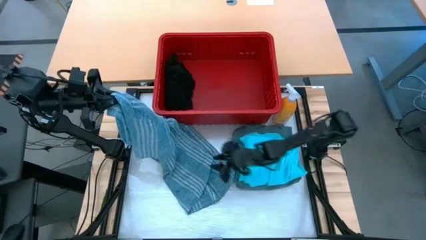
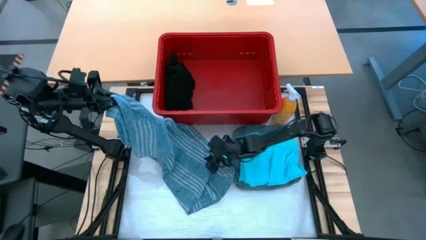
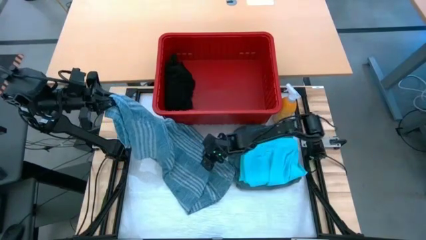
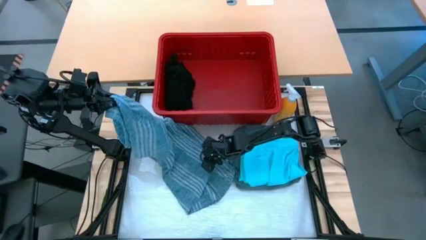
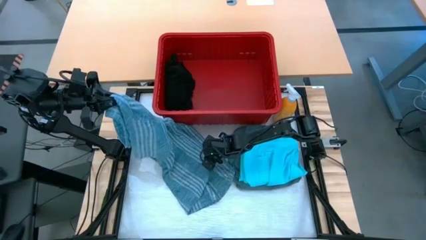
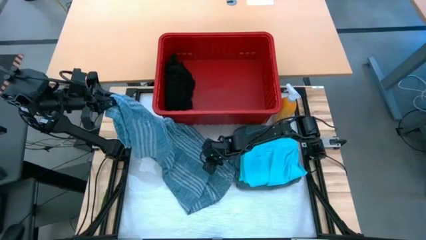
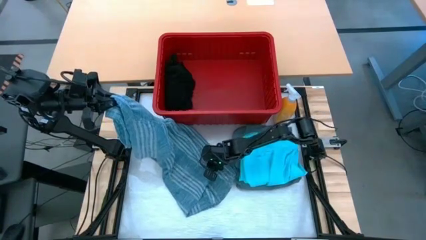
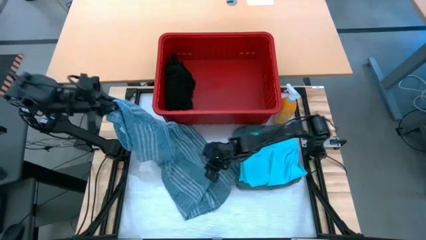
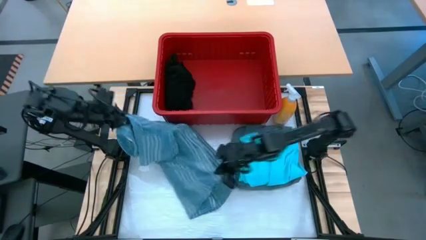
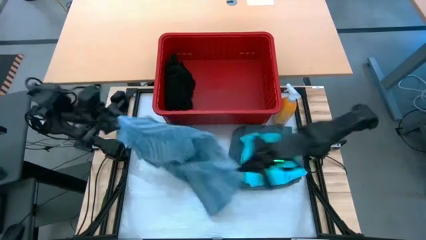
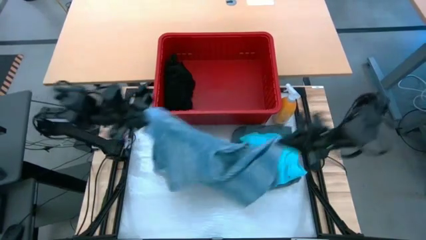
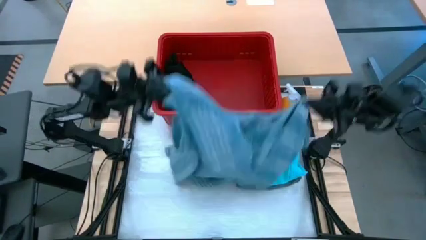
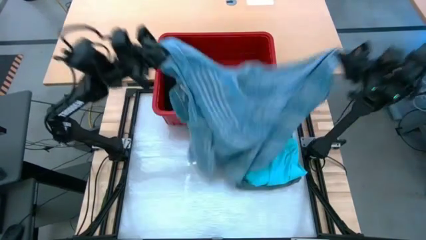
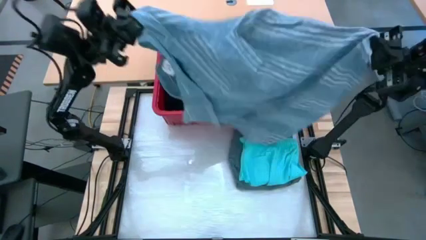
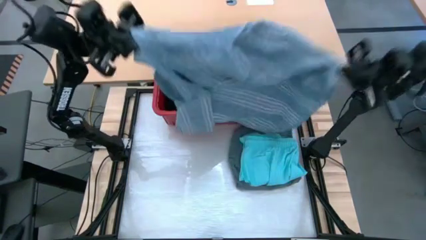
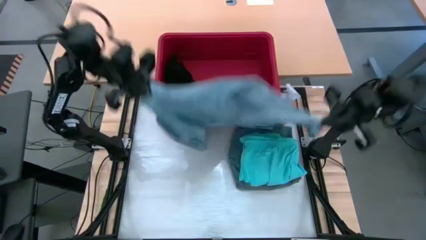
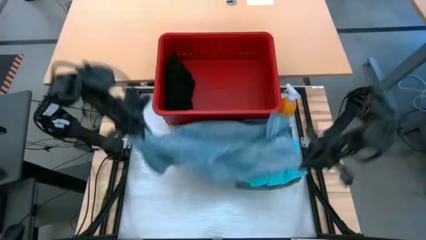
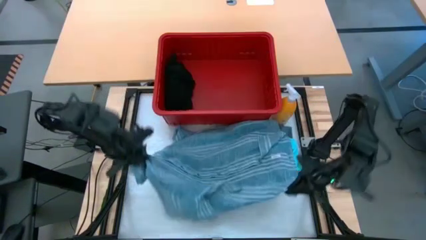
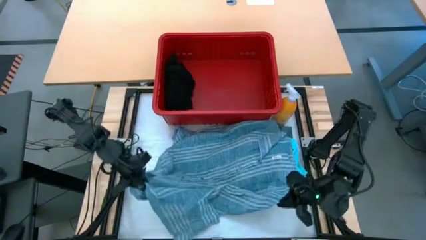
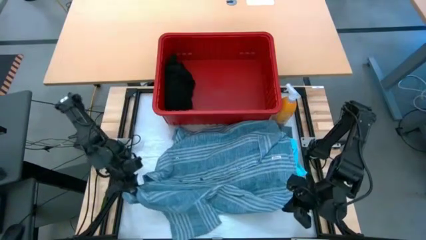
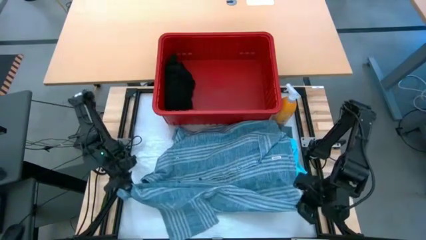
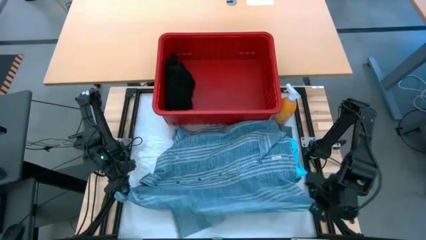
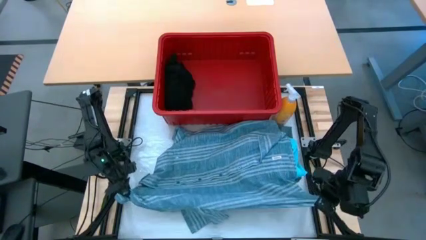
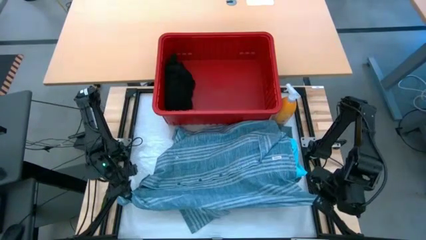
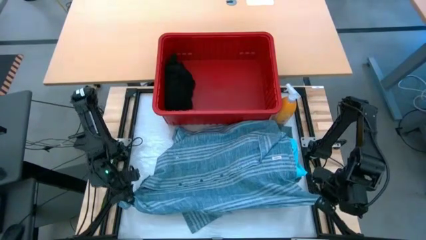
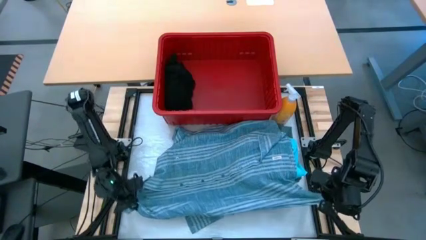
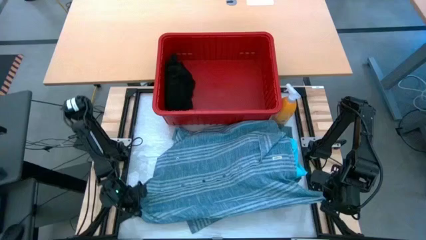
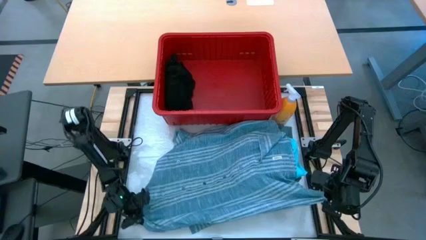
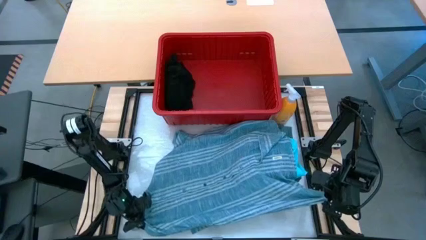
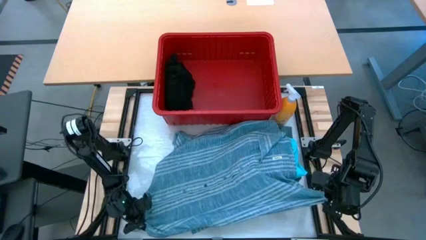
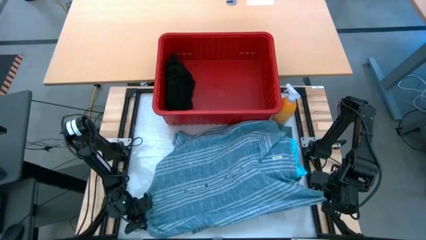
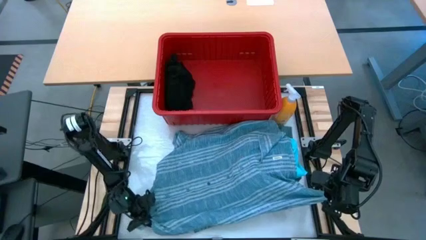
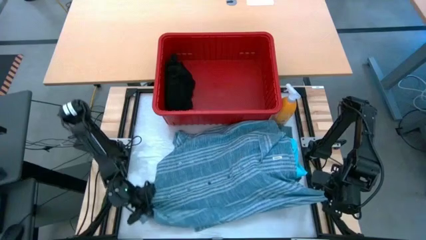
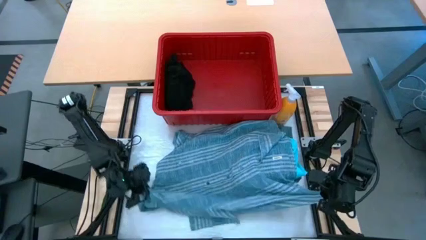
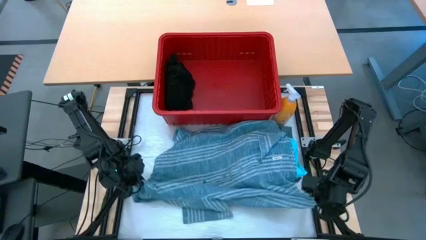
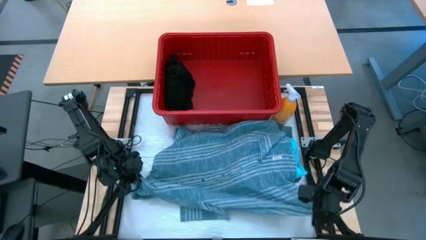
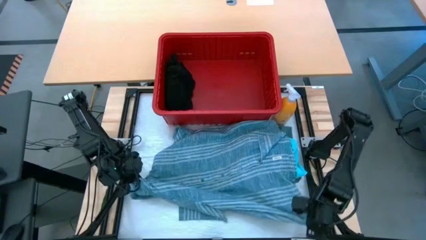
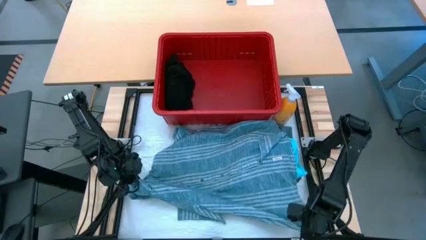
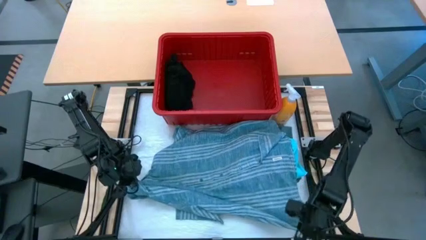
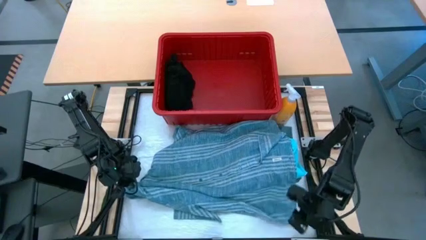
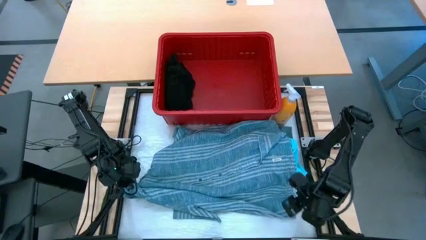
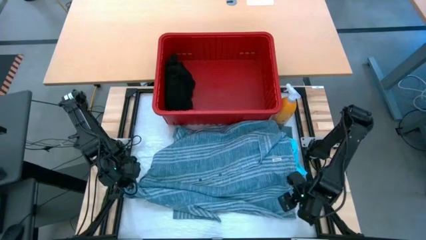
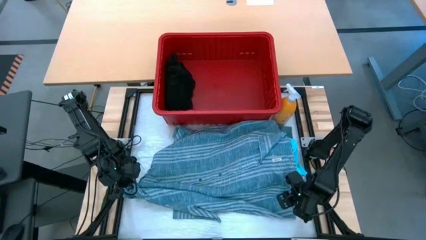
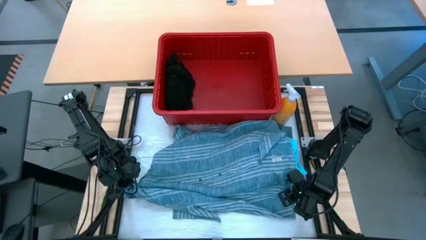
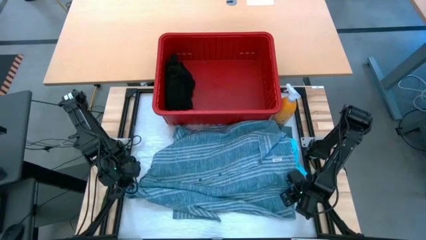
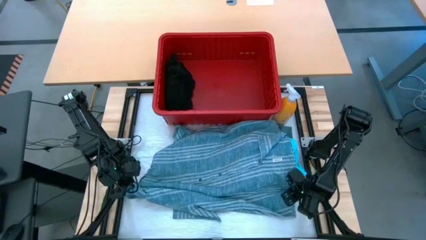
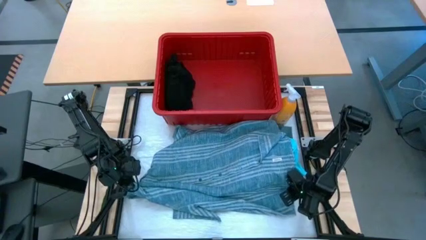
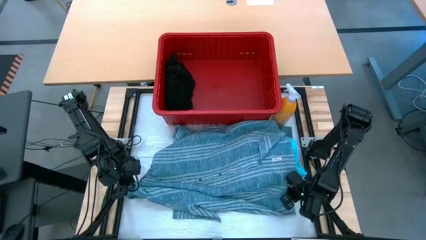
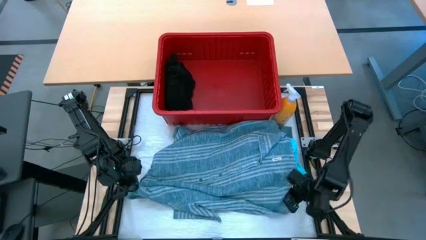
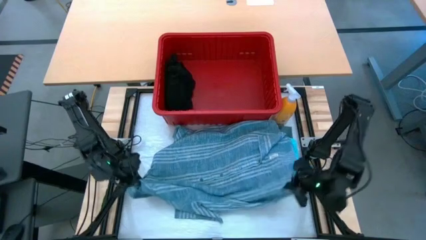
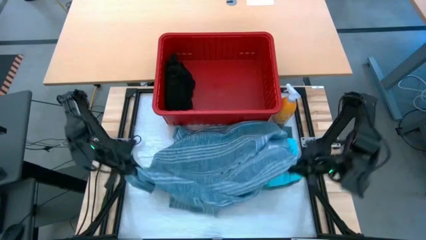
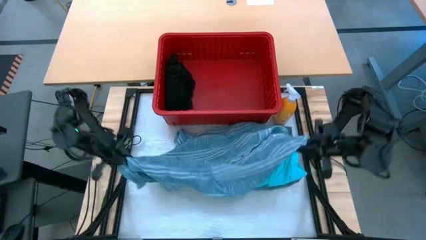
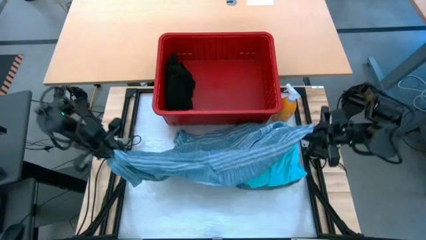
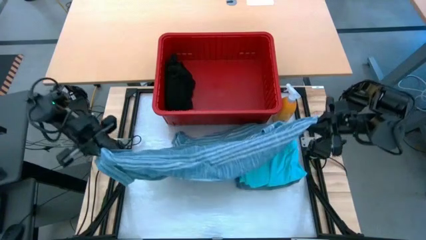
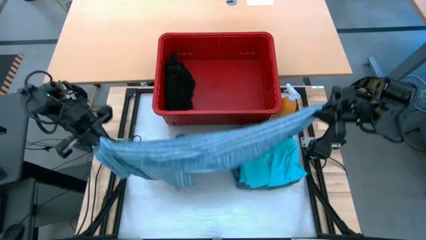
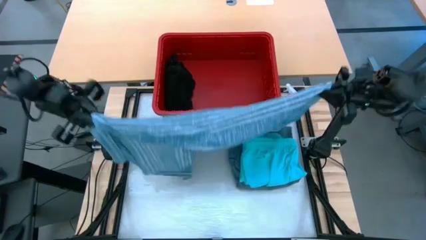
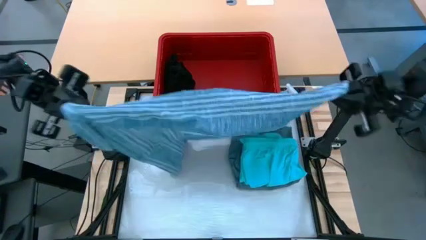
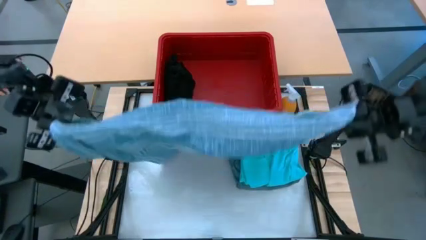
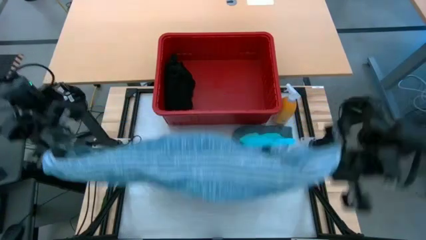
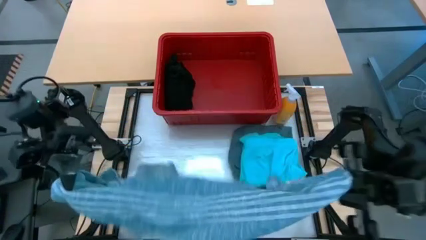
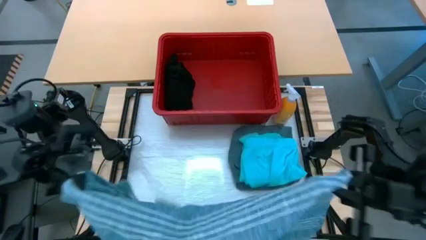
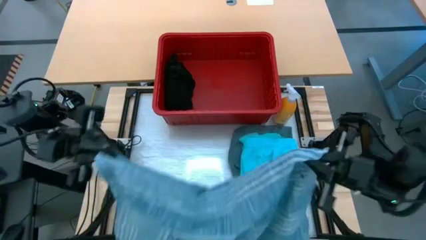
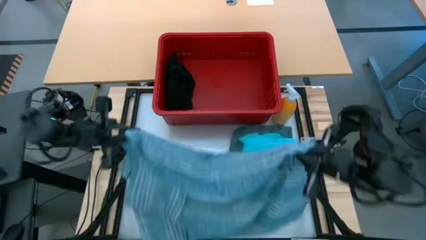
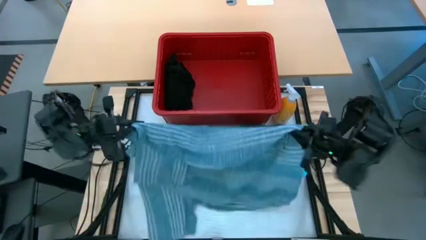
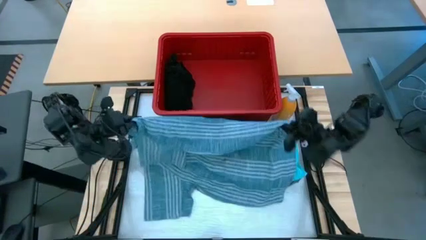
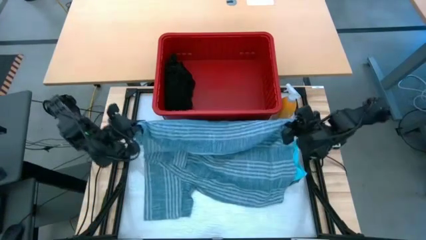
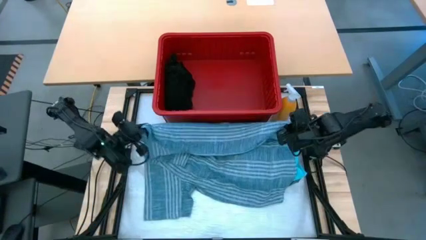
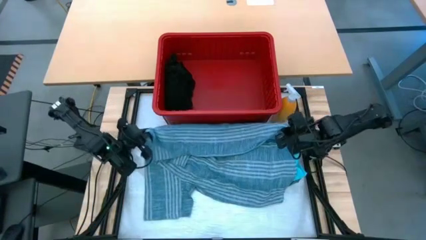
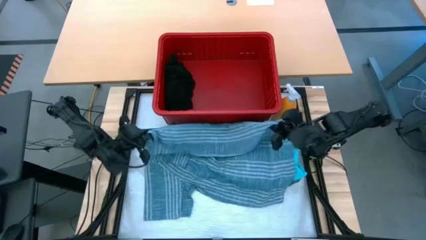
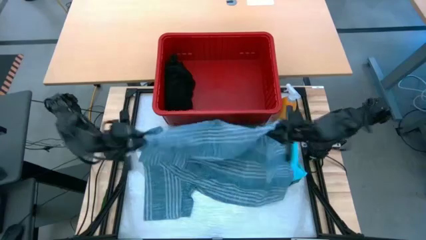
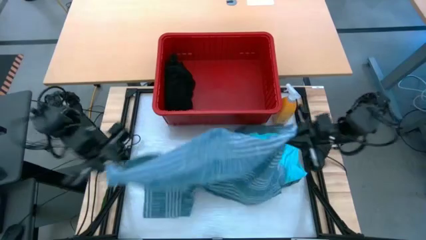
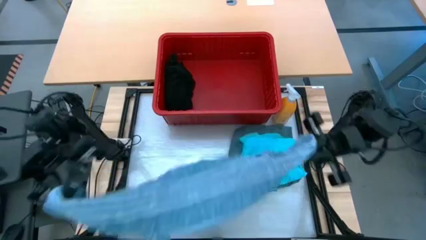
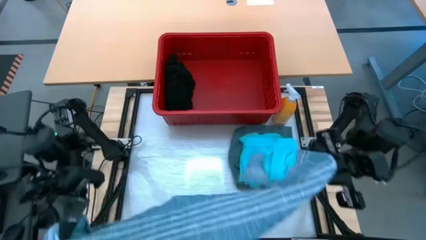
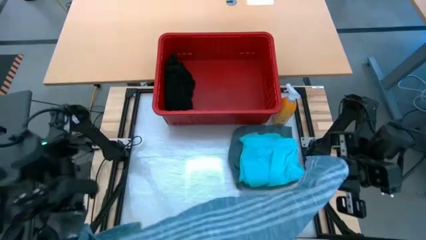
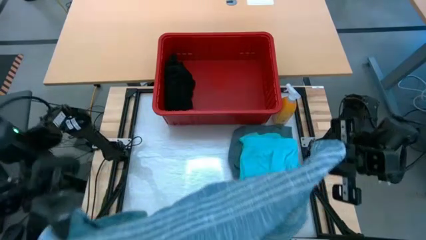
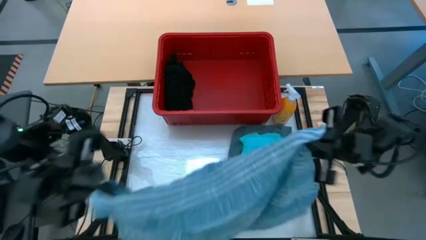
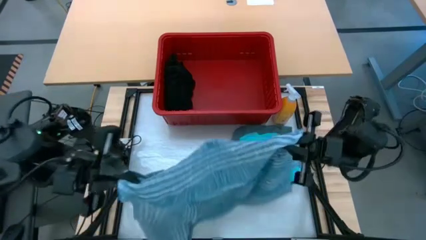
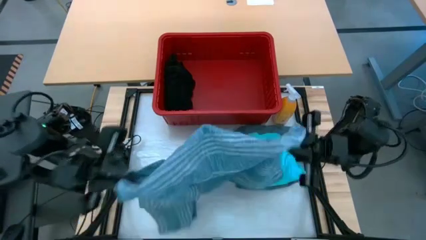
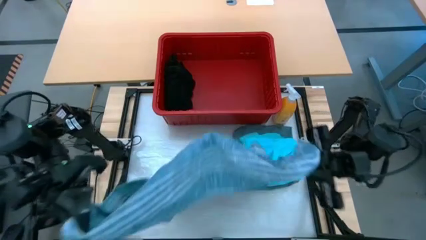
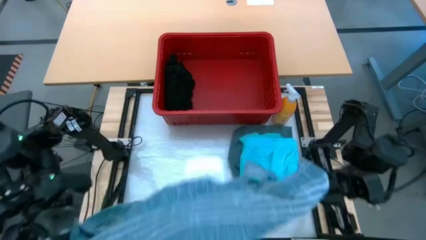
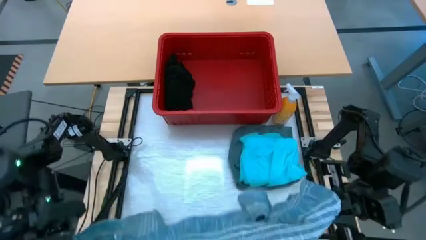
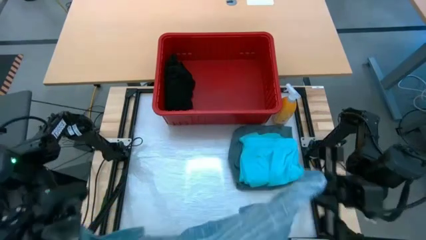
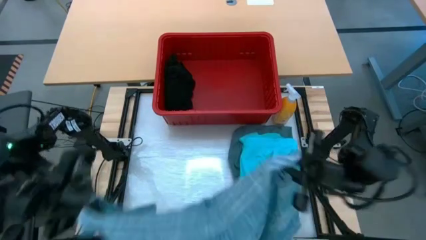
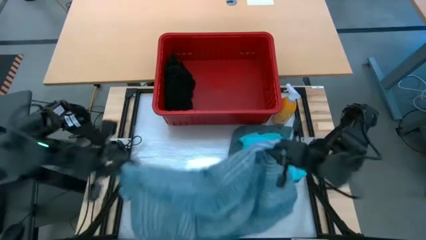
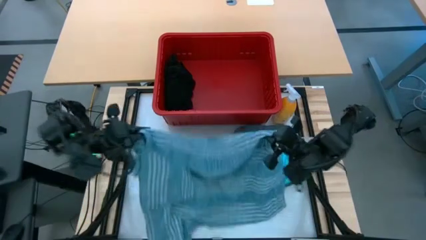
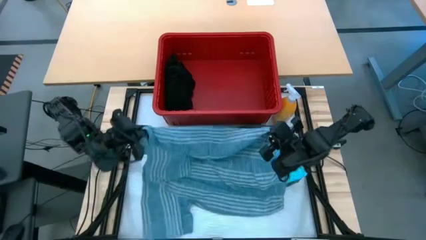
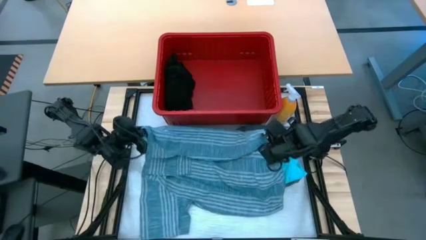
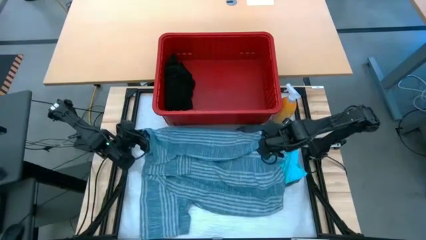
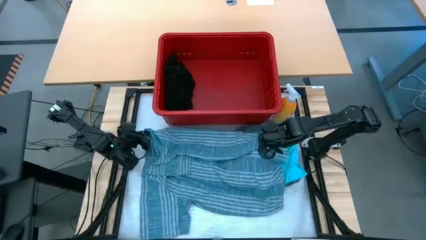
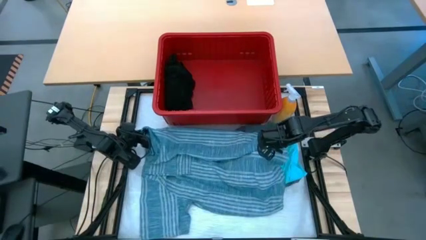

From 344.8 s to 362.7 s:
Task: Fold Laundry from Bin
Fold the blue shirt
